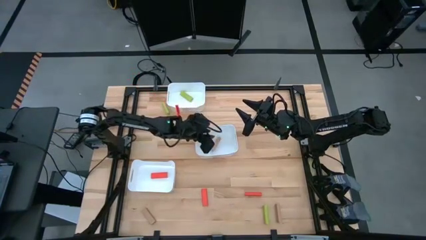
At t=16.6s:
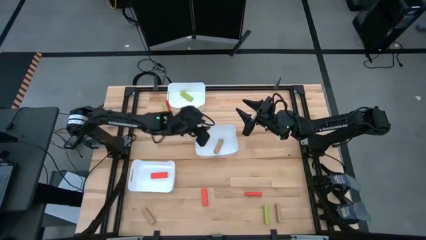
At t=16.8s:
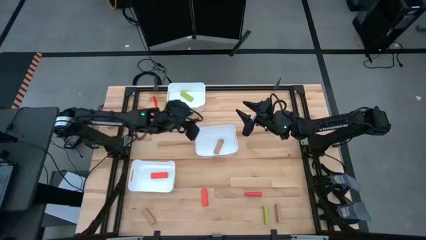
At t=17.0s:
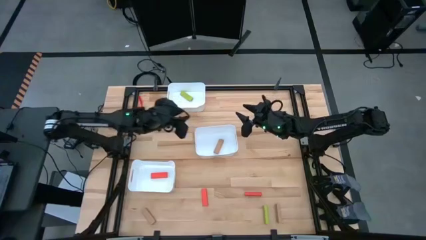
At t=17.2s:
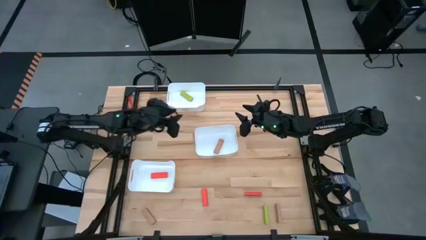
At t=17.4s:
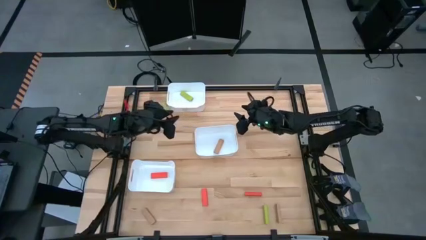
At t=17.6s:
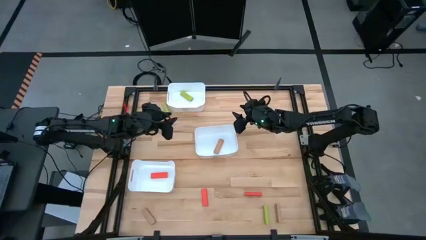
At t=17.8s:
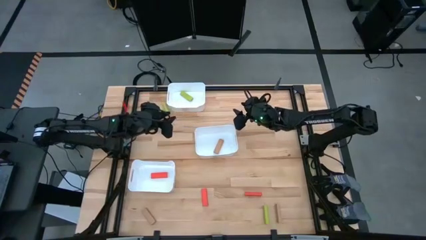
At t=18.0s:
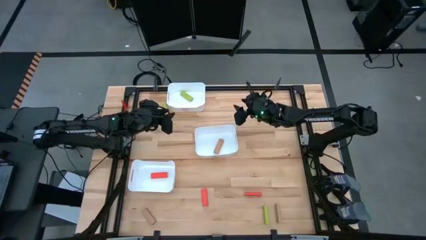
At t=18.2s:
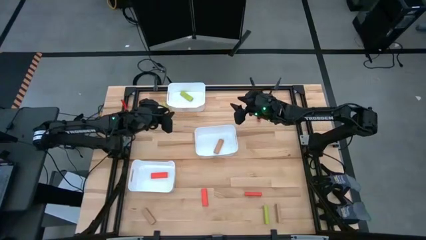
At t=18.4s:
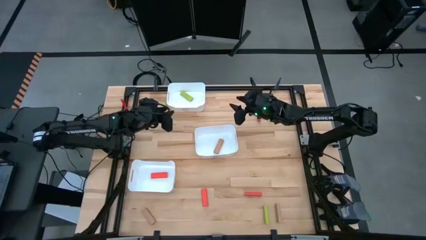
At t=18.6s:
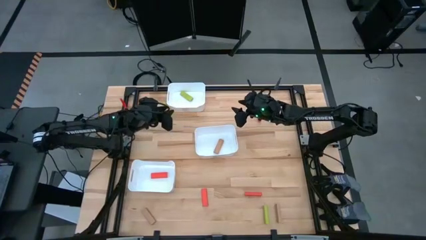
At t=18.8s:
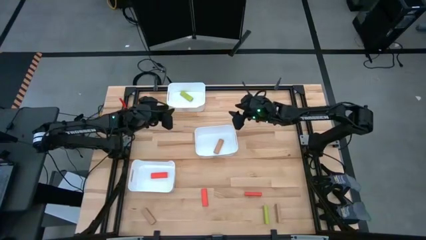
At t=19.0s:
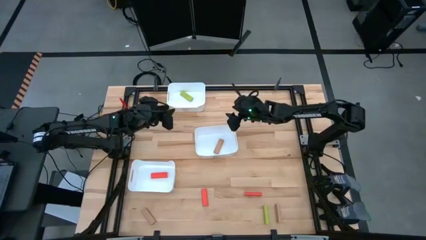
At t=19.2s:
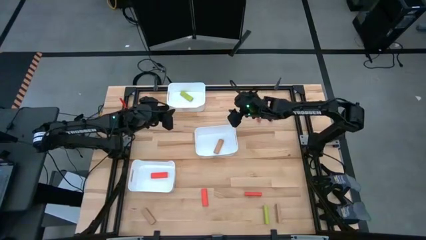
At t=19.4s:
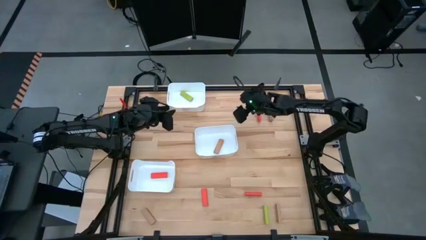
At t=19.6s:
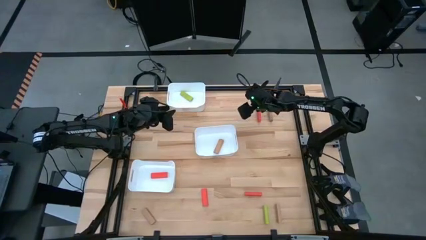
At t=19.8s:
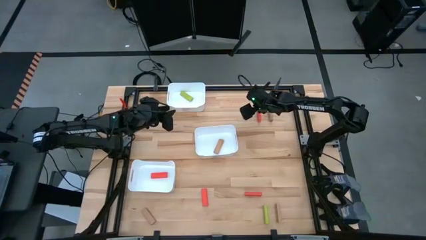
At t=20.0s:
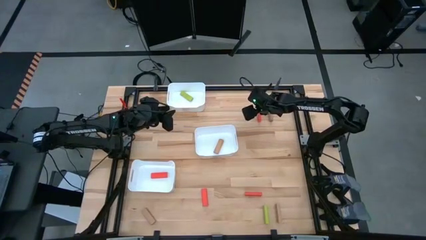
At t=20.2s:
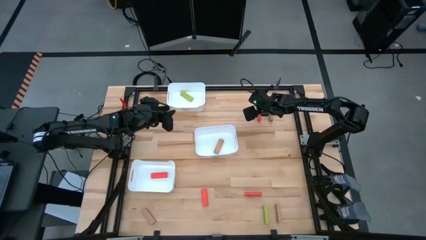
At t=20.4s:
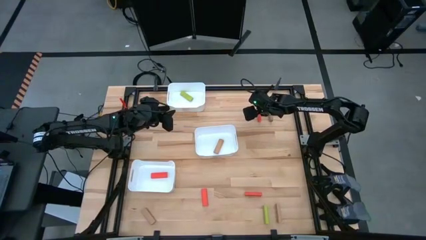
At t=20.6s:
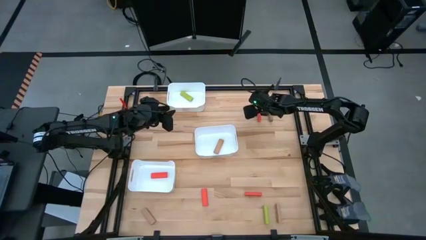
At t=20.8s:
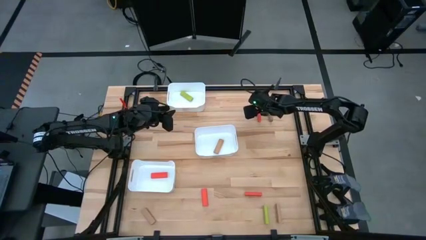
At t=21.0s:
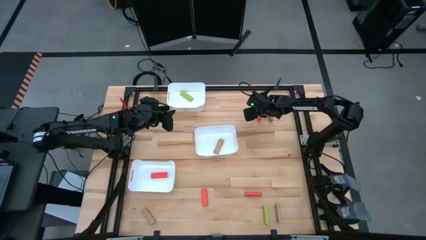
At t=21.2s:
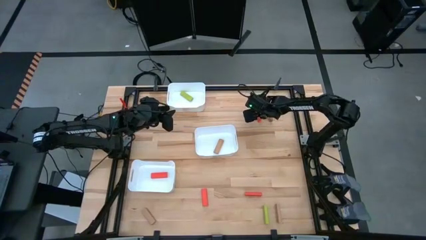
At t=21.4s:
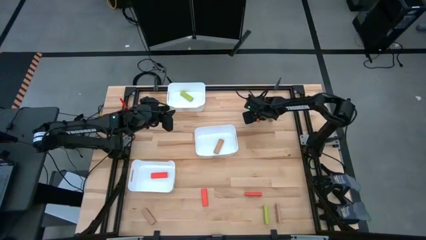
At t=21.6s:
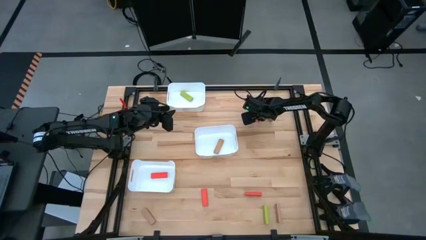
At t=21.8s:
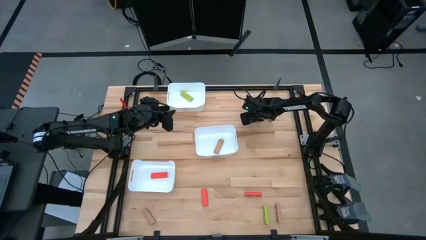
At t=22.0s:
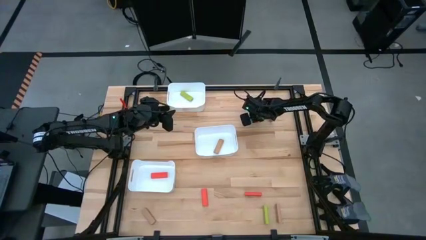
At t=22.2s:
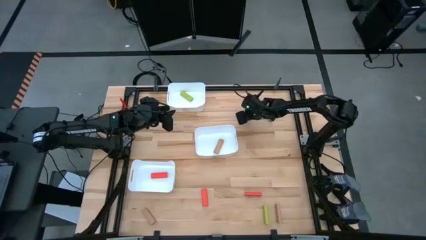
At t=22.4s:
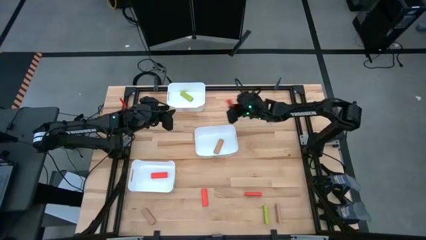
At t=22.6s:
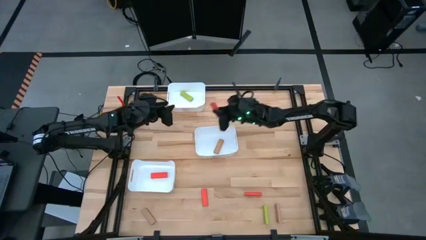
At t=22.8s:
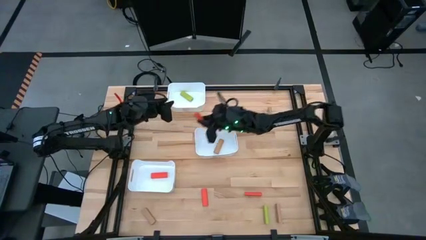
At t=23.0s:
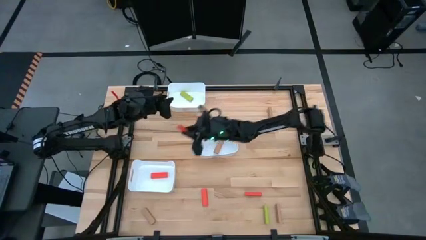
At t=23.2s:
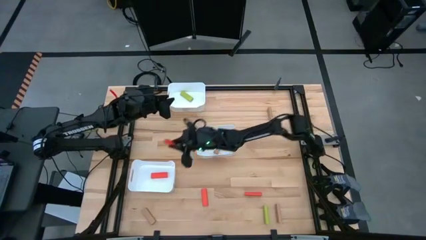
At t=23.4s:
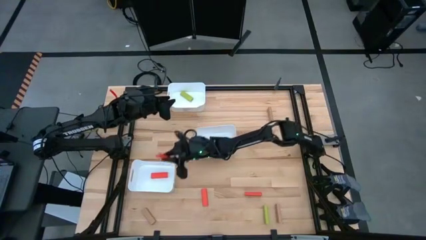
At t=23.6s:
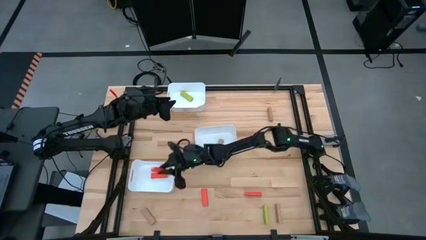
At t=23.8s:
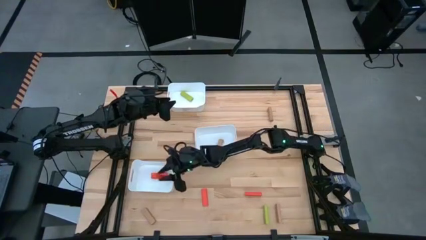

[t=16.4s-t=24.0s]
Task: Sort blocks
Put the orange block into the bottom white bin

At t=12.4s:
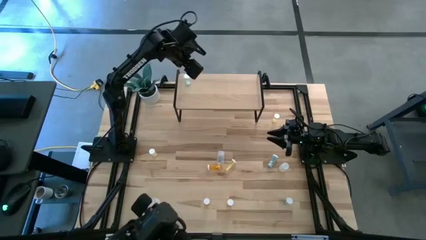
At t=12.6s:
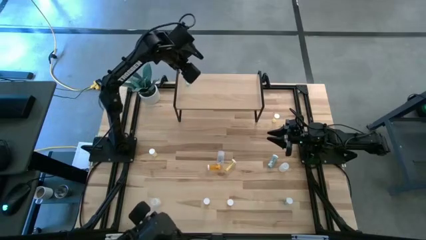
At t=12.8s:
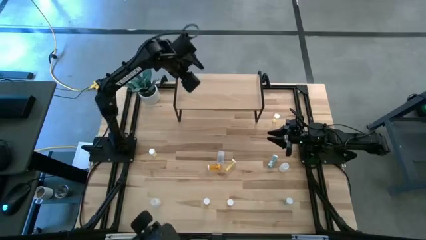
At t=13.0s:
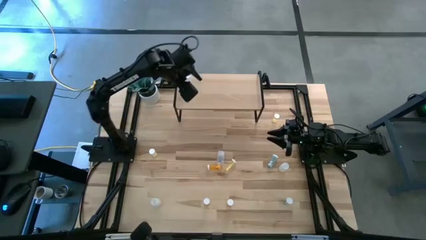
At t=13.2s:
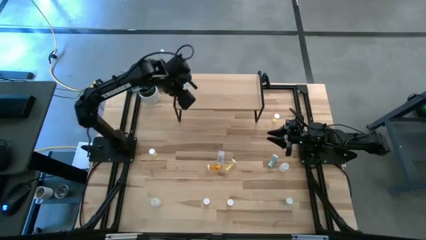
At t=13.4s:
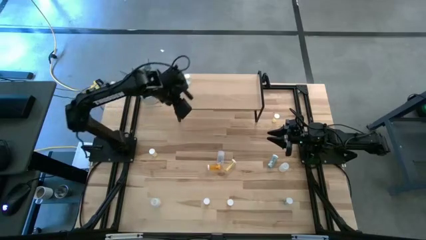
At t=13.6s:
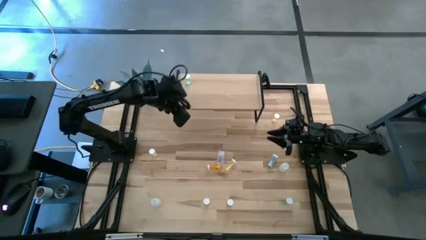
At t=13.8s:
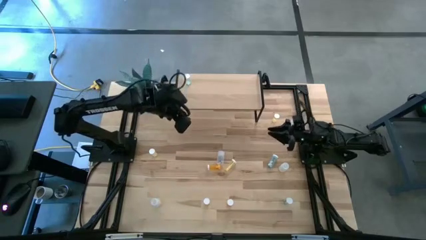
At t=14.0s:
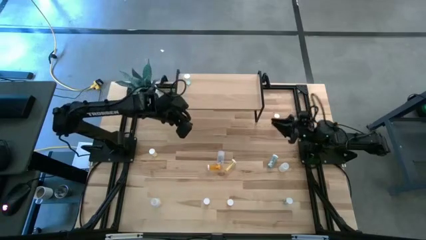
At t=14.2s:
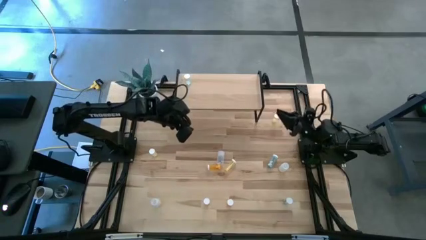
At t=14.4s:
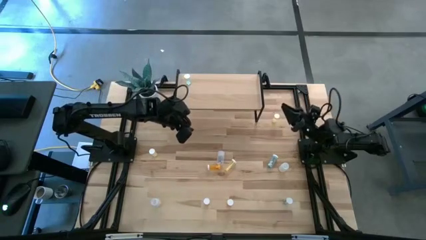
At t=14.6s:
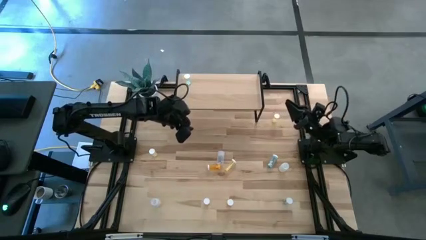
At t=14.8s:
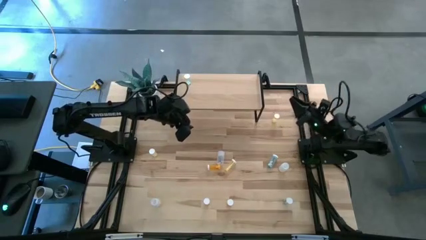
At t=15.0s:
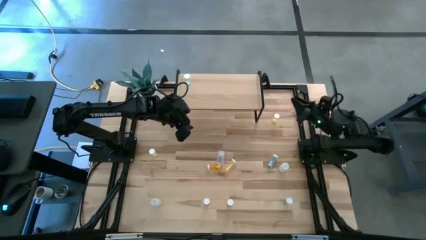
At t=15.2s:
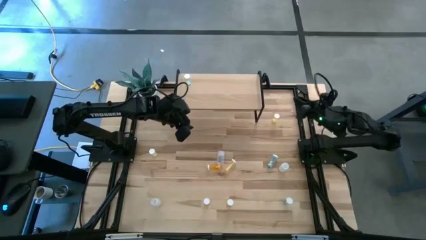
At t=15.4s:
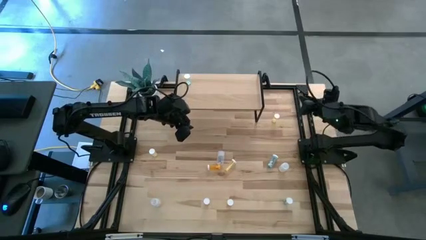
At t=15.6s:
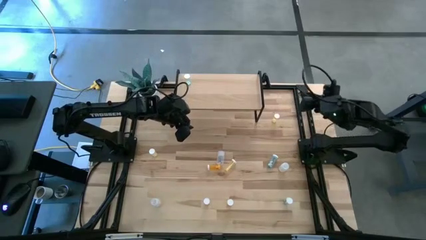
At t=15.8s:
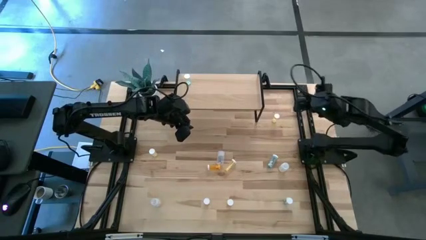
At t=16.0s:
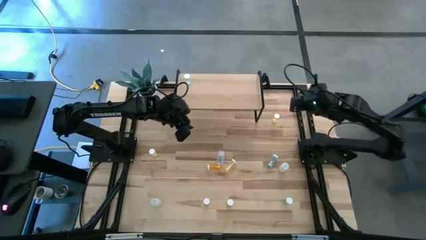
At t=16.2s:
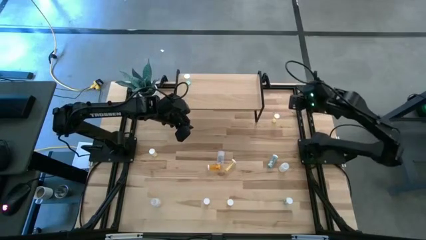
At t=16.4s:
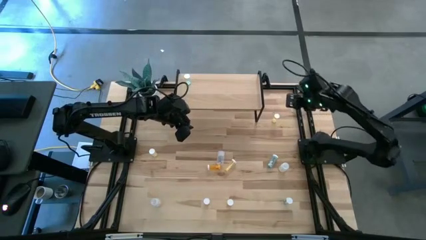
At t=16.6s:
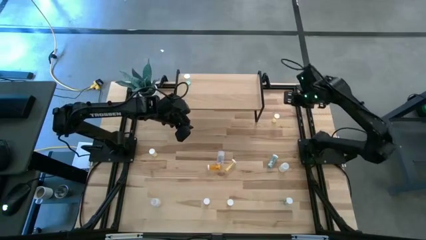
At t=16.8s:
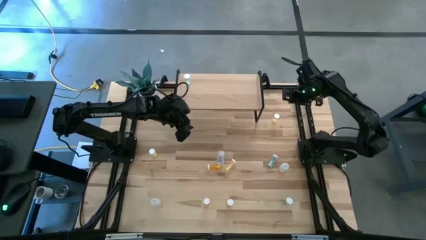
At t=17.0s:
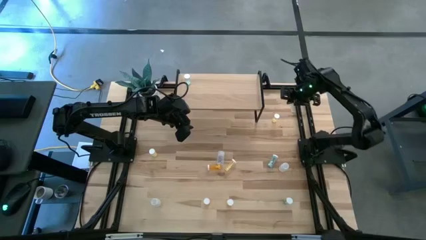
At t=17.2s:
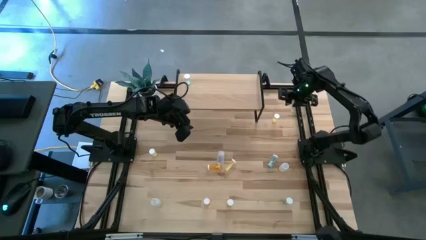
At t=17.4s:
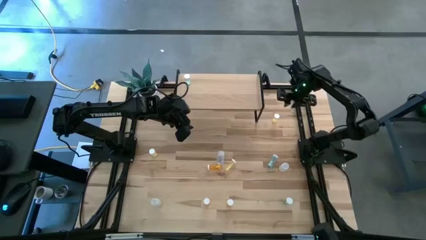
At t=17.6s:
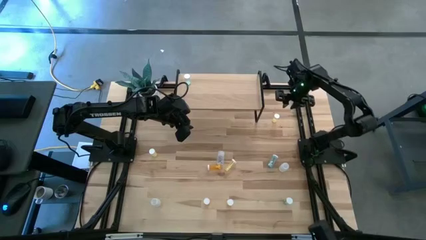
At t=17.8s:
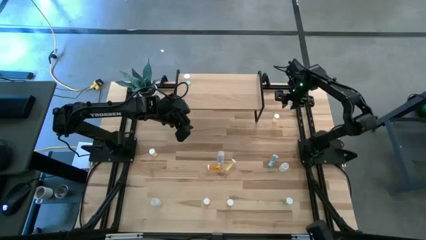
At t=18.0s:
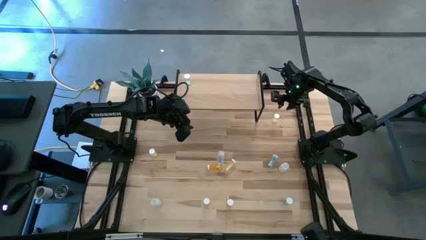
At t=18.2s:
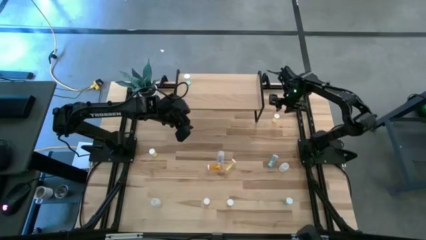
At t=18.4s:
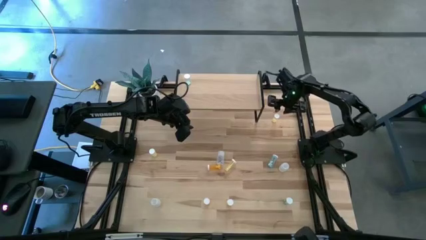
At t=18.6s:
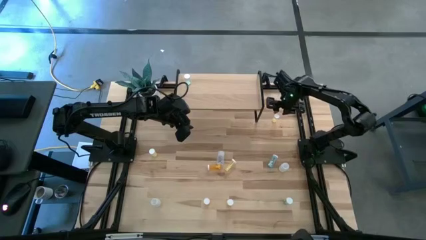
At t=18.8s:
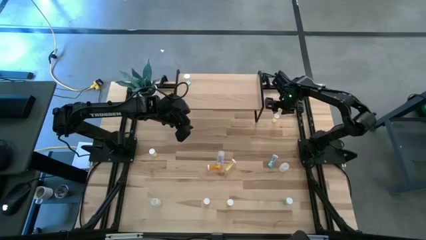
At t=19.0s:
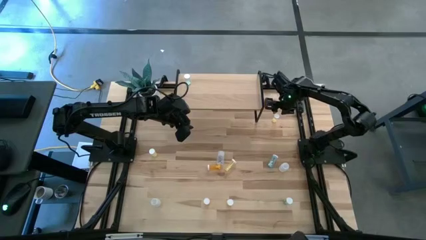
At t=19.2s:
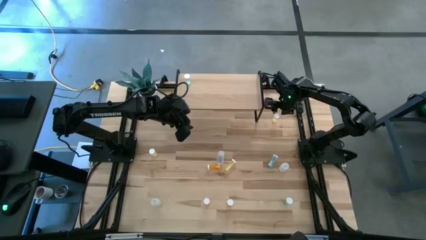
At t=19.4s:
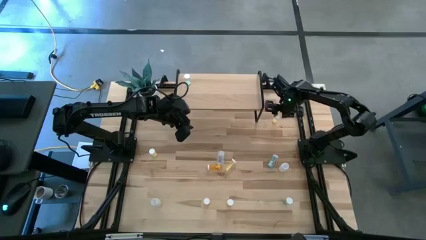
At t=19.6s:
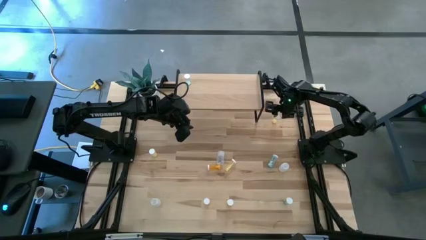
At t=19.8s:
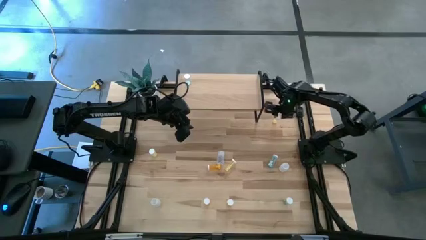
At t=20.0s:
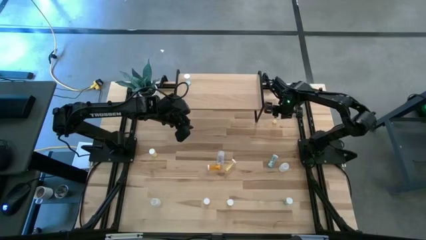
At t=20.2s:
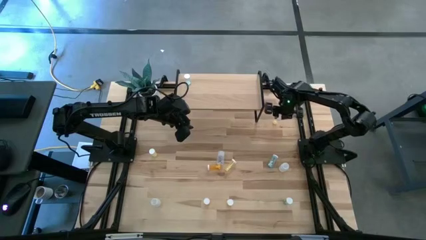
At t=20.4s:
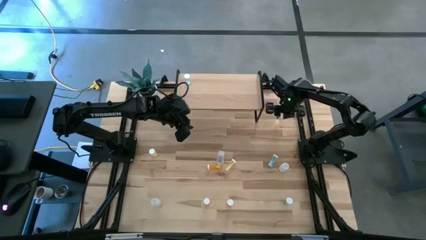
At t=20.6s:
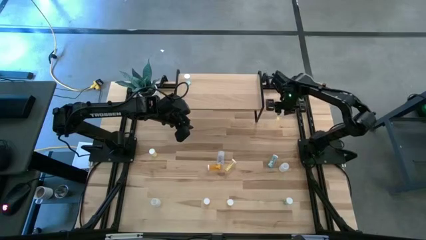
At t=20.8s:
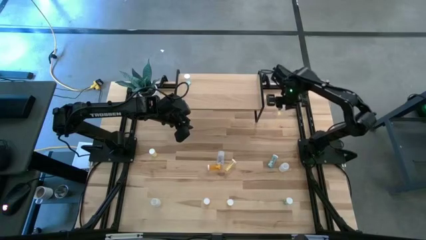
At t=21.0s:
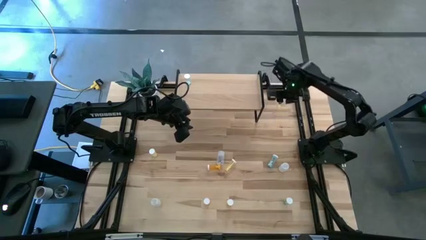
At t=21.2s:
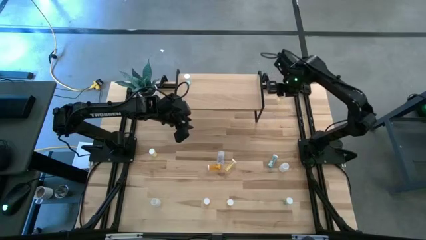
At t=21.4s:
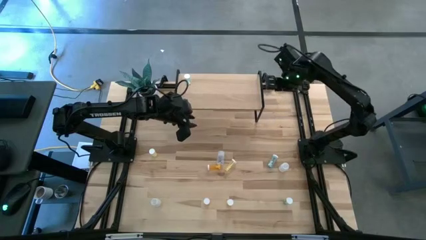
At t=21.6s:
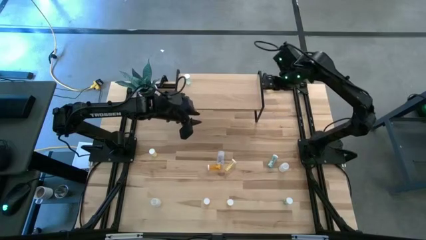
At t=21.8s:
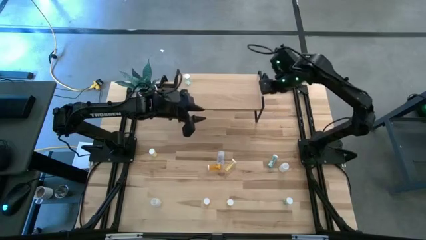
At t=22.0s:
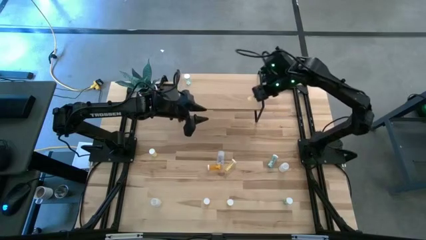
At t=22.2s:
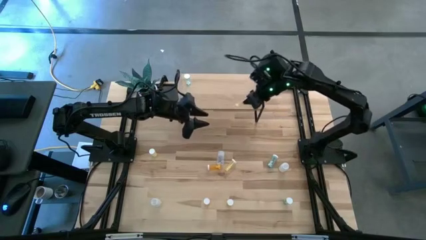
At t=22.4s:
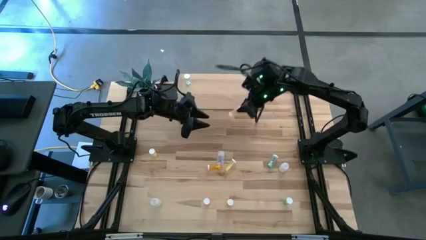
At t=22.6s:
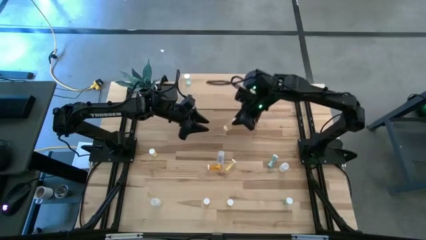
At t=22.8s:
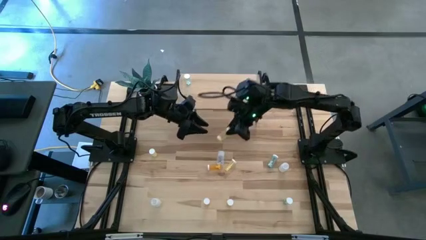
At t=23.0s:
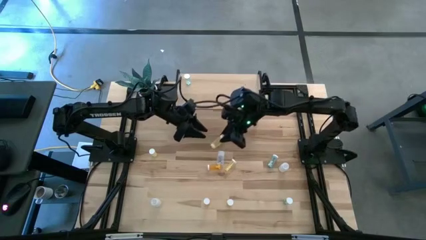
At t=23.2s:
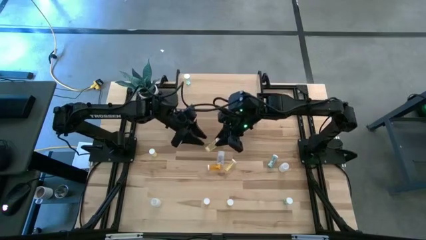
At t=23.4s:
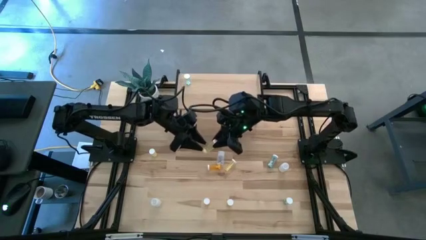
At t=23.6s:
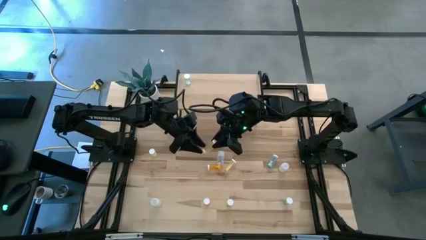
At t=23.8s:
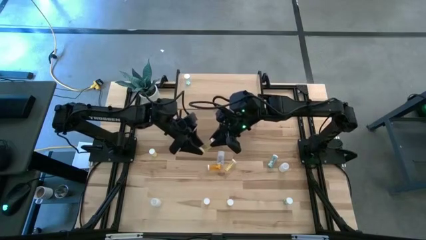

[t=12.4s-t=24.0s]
Task: Pick and place medicine bottles onto shelf by color
Put the top right yellow pill bottle on the shelf
